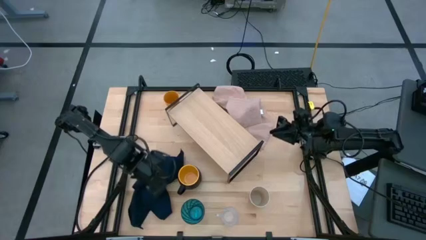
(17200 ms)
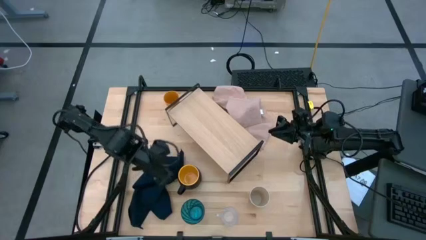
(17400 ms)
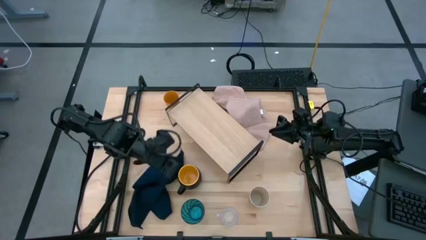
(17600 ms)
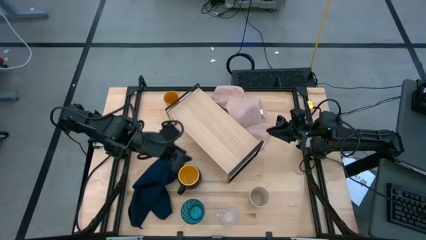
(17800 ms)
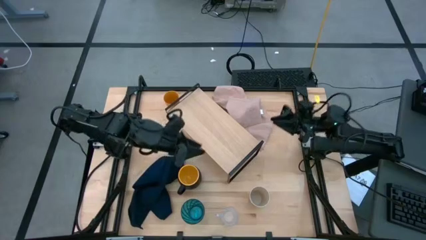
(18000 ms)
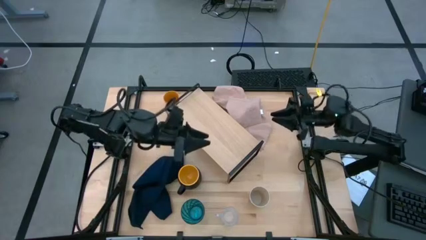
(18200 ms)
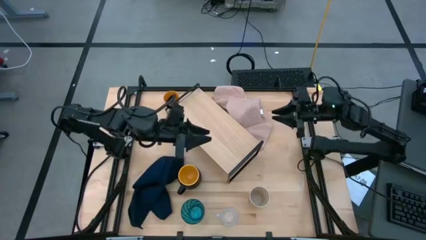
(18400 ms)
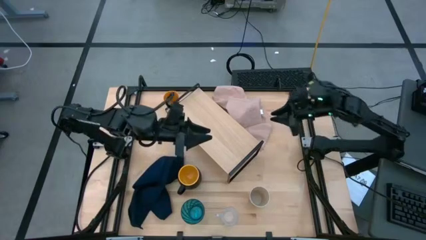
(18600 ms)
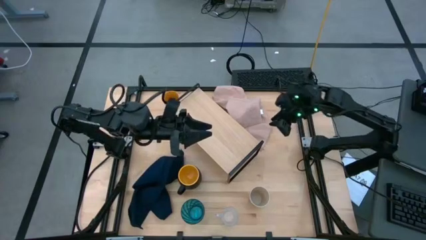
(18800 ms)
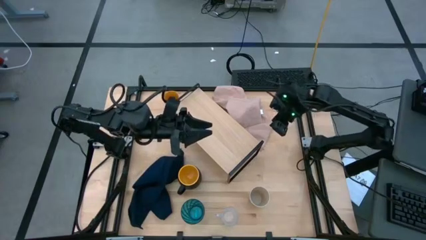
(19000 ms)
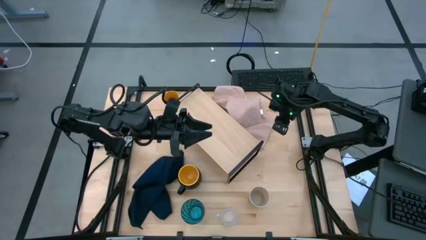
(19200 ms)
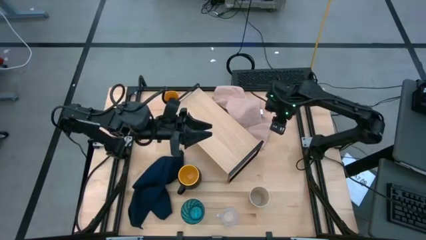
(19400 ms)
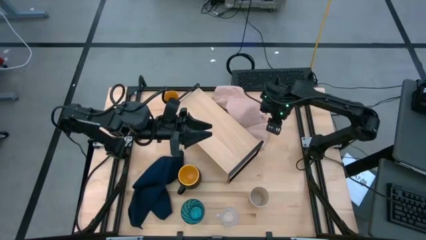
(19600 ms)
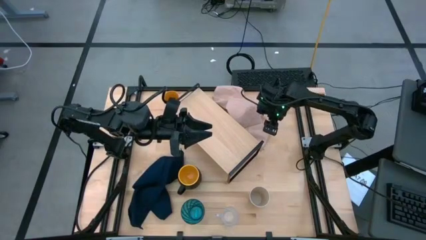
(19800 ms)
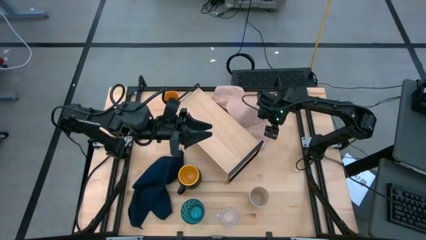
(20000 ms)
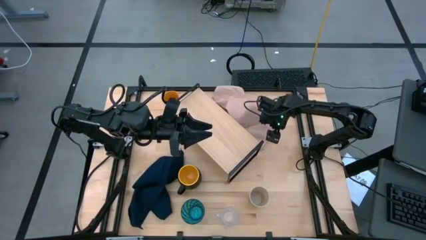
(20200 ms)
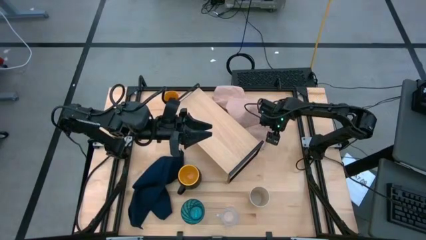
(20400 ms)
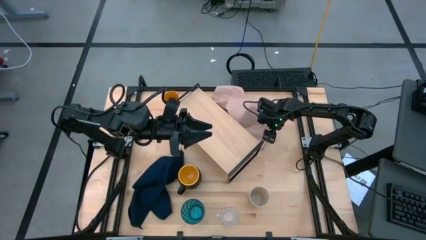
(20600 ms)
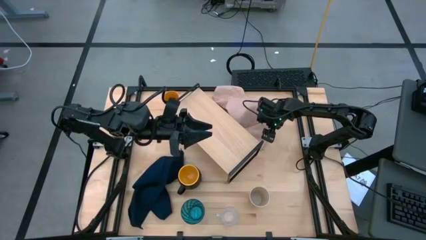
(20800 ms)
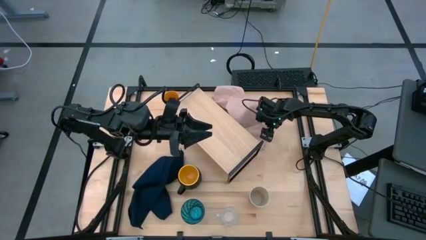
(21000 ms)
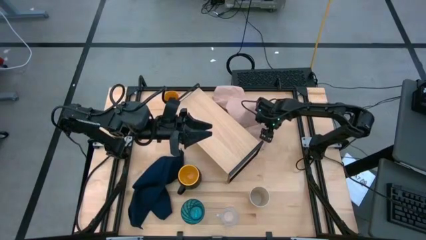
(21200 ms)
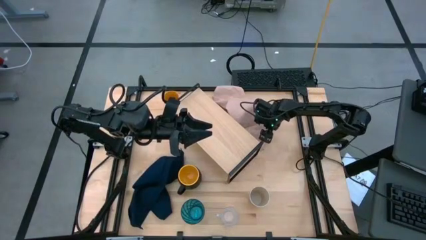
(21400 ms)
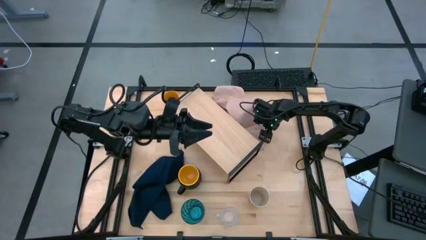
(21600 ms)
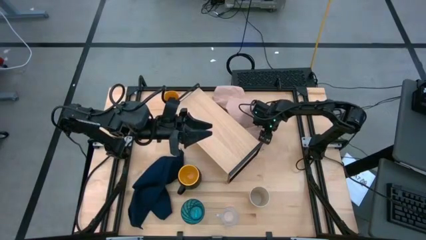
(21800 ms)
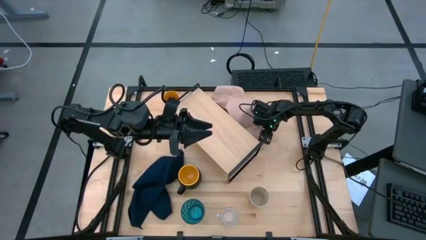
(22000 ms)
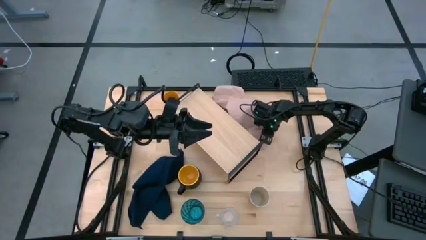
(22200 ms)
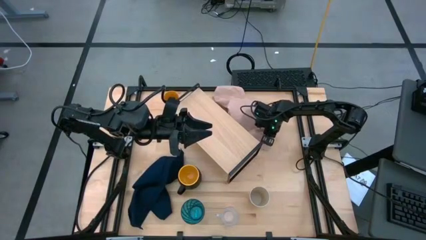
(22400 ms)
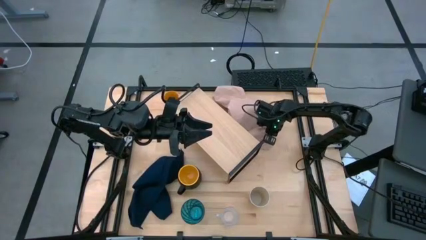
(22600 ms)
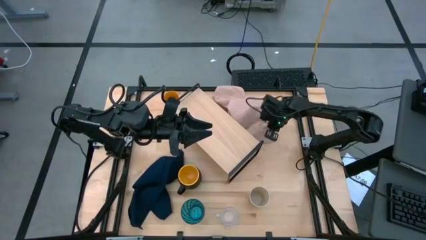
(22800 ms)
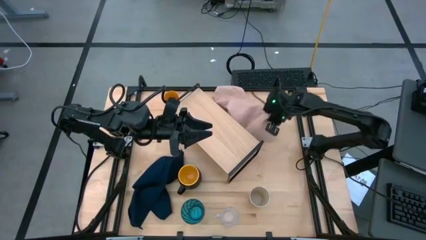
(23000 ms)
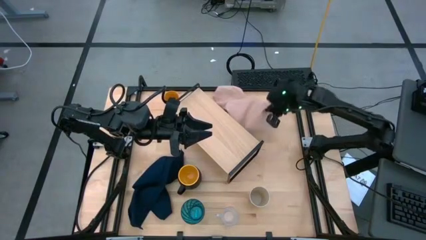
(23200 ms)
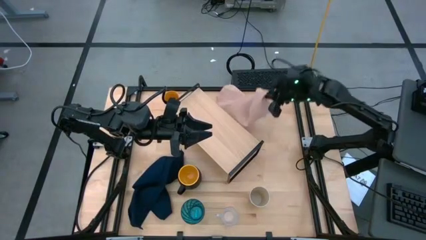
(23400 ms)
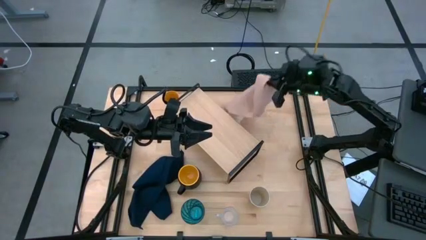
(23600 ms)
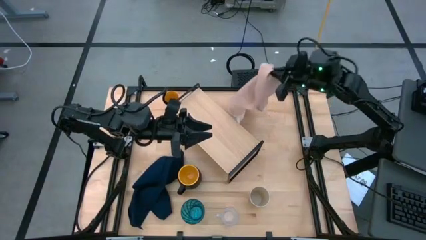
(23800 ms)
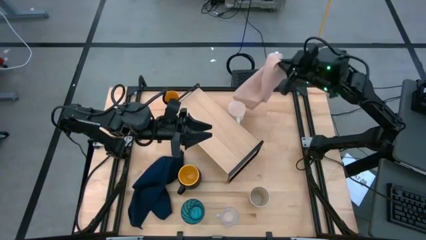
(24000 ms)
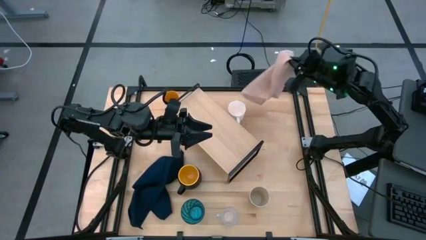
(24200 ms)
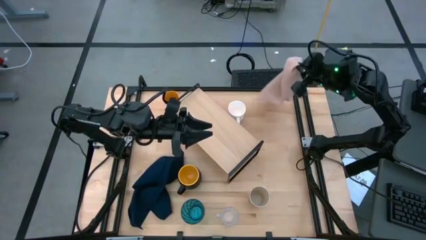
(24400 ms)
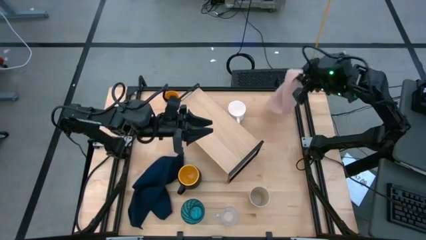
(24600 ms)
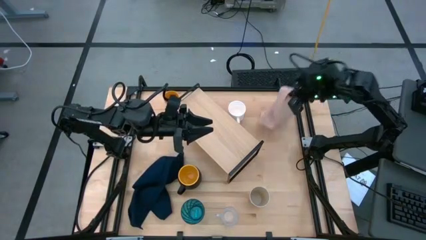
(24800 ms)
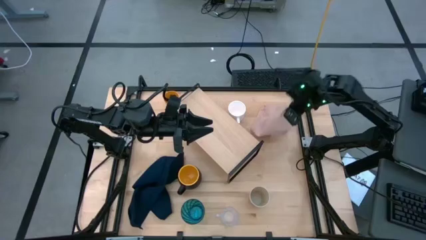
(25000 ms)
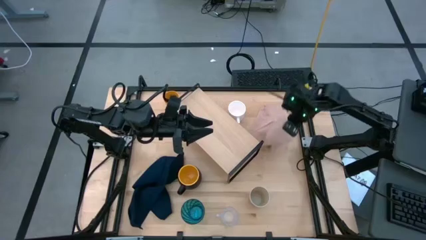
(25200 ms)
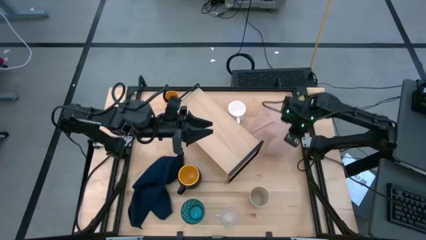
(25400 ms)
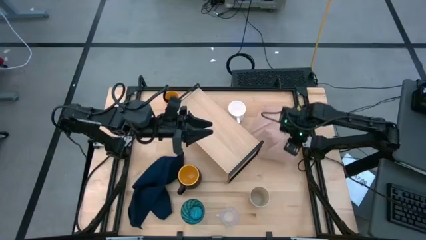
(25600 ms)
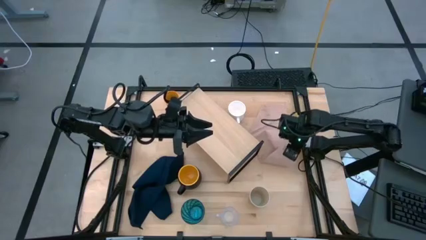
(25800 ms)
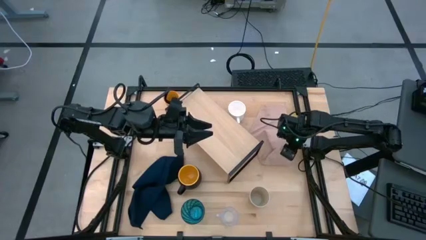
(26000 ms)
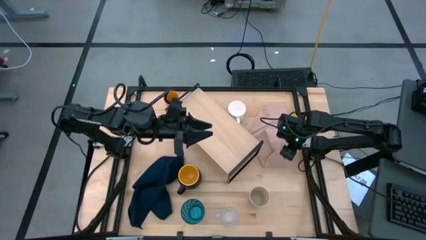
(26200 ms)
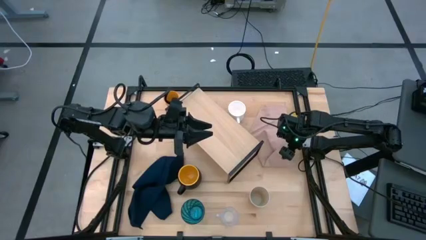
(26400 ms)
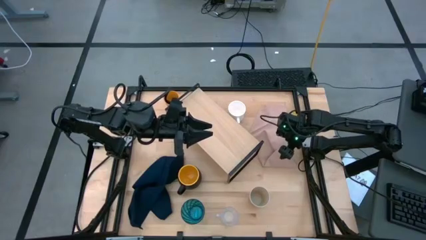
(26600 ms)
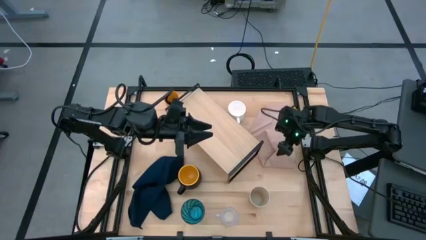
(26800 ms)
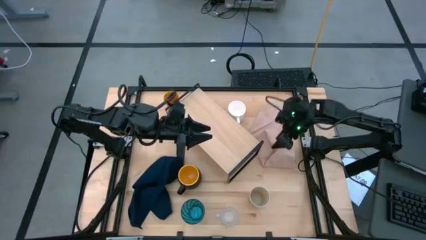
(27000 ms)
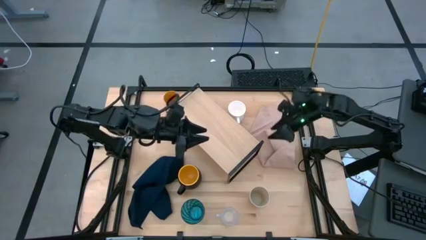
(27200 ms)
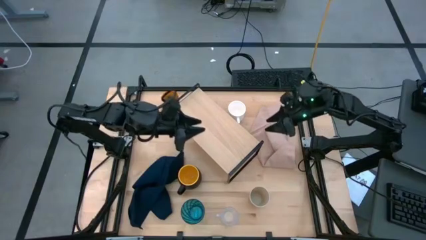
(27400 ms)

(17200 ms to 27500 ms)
Task: Stack small to large cups/mugs on shelf
Remove the brown towel on top of the white mug
